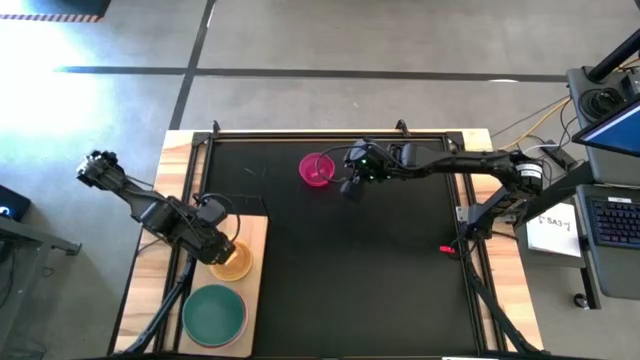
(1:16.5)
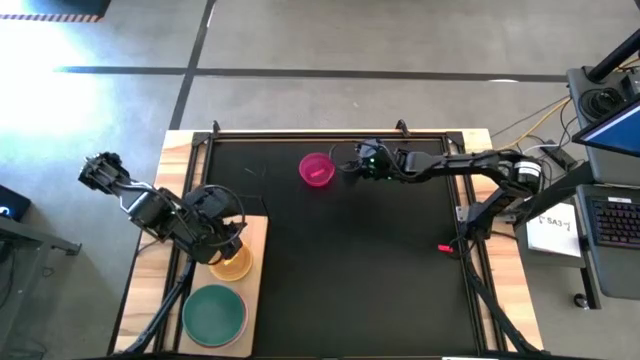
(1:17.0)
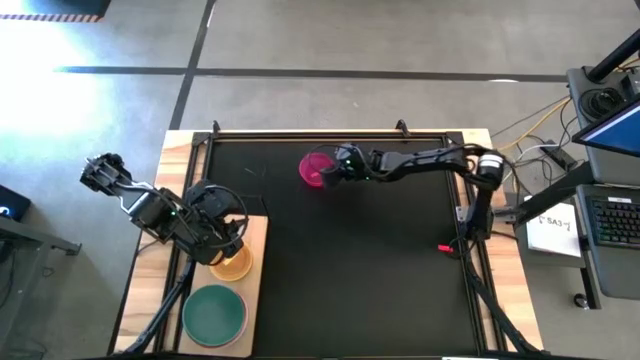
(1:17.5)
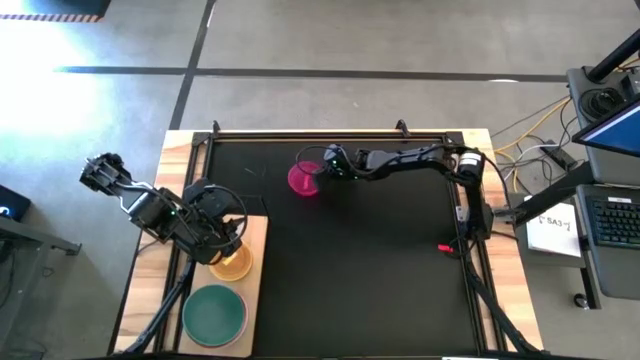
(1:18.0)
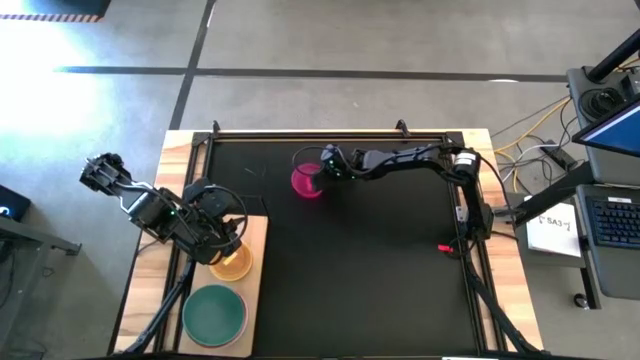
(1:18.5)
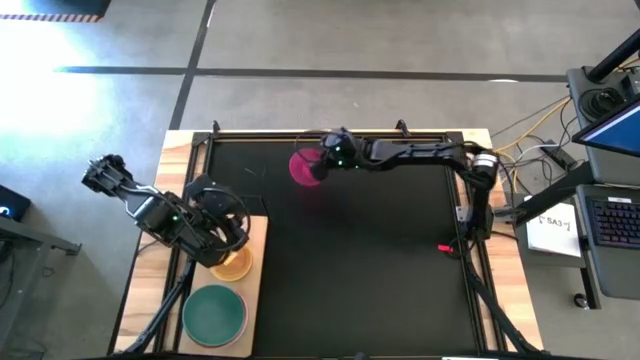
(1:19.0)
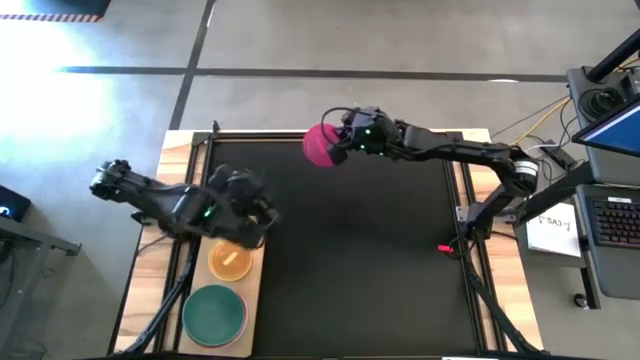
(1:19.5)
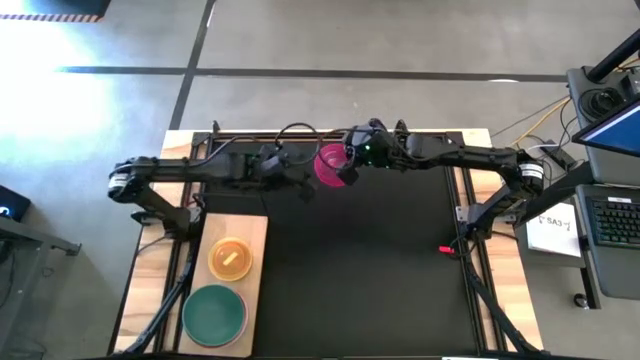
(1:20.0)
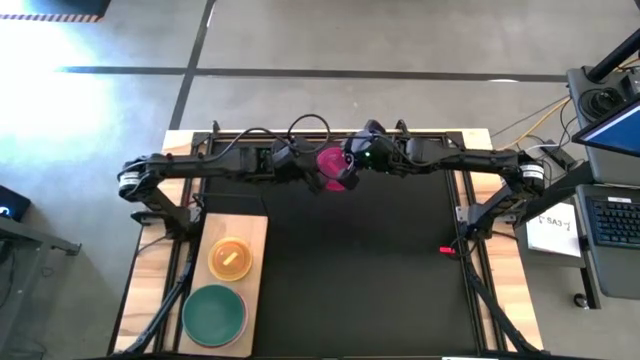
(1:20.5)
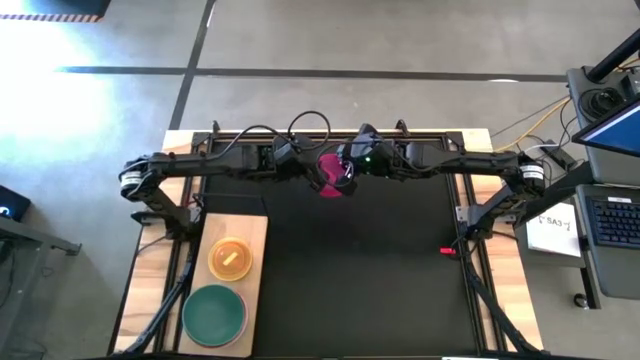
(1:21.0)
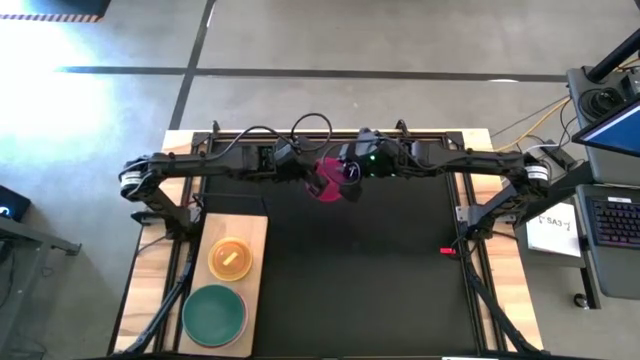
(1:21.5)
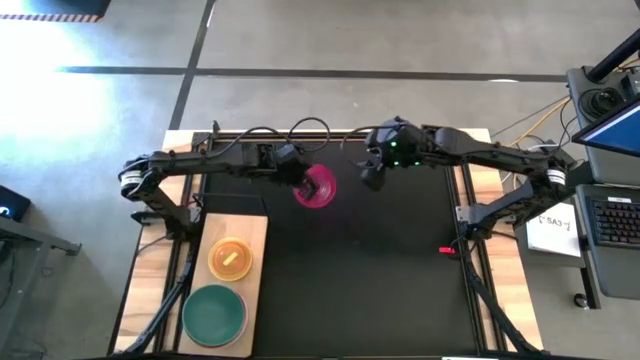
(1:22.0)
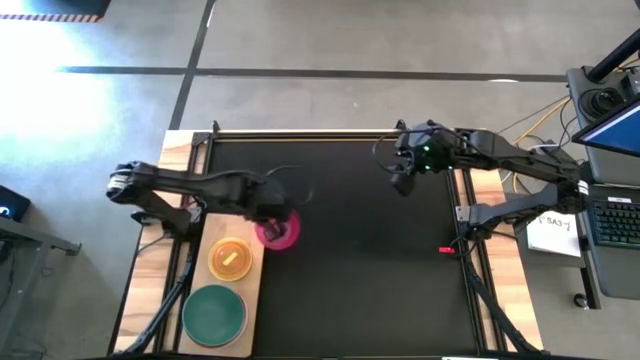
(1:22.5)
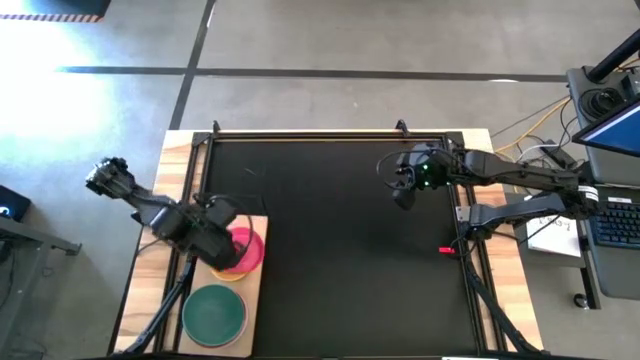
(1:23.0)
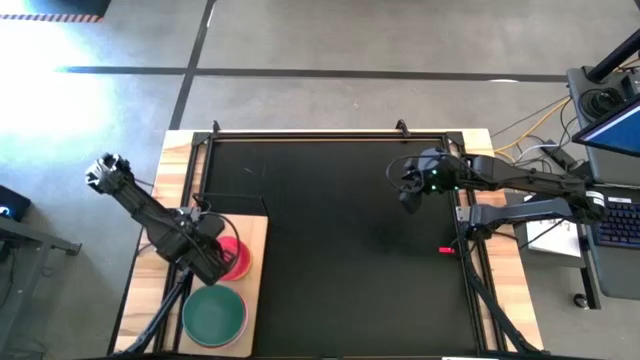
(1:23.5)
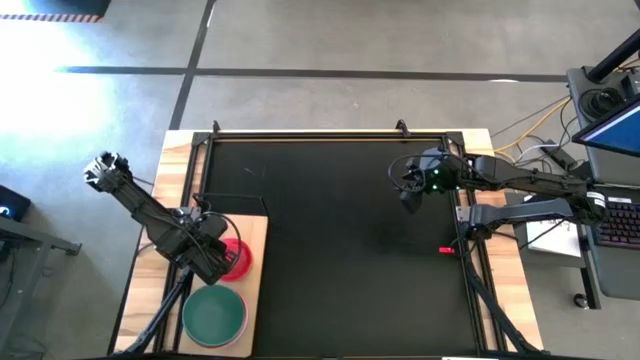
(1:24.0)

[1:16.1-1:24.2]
Task: Place and stack bowls onto a shelf
Stack the pink transparent bowl on top of the yellow transparent bowl on the shelf

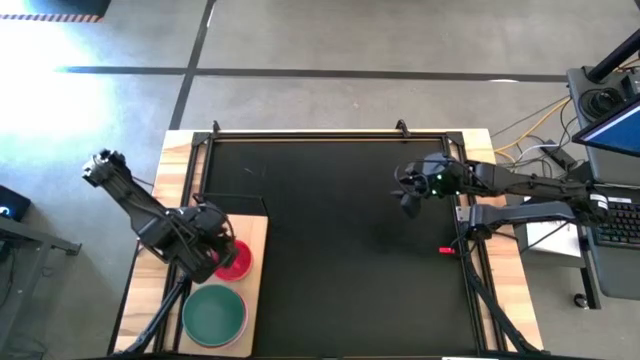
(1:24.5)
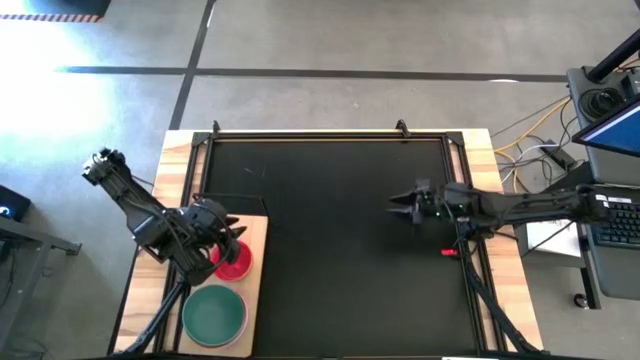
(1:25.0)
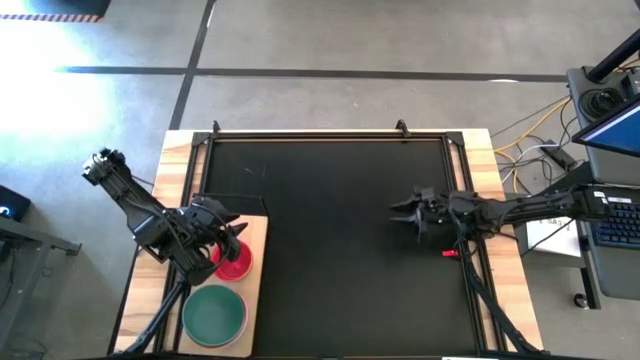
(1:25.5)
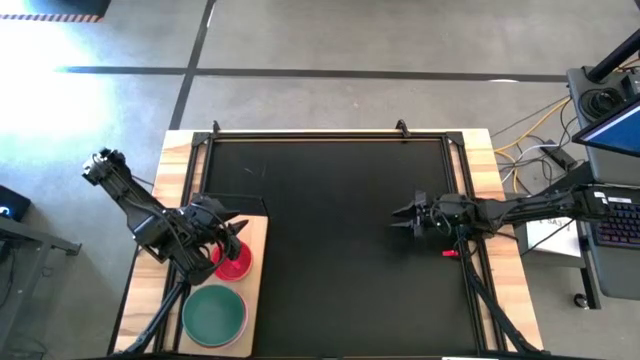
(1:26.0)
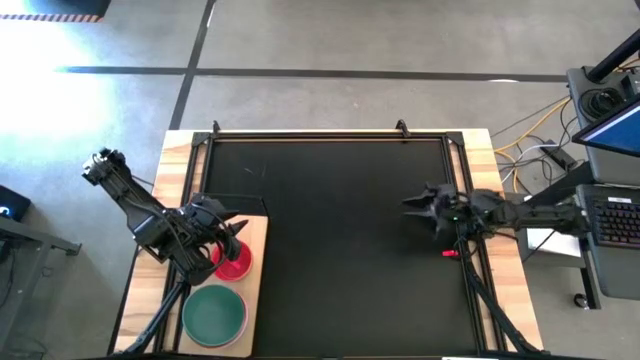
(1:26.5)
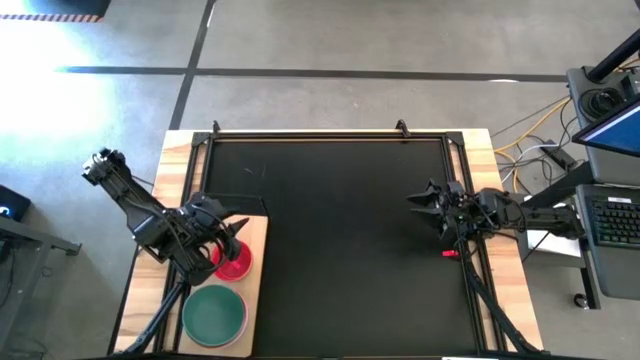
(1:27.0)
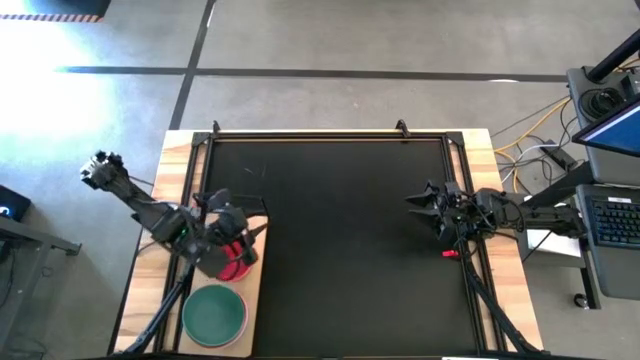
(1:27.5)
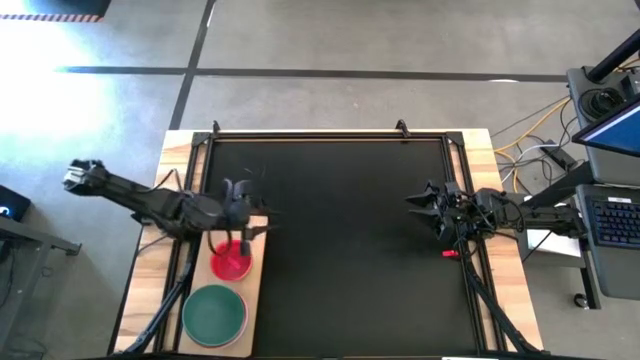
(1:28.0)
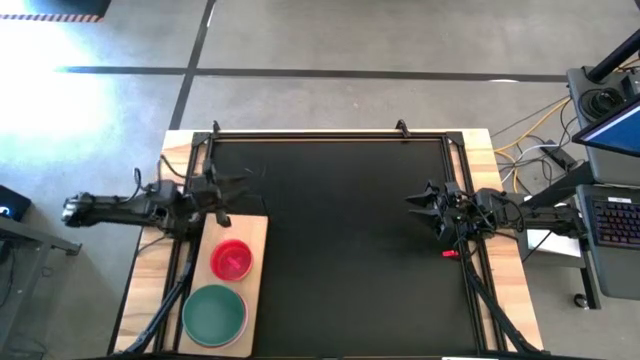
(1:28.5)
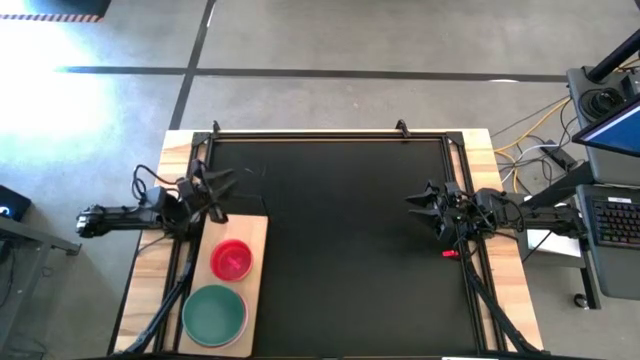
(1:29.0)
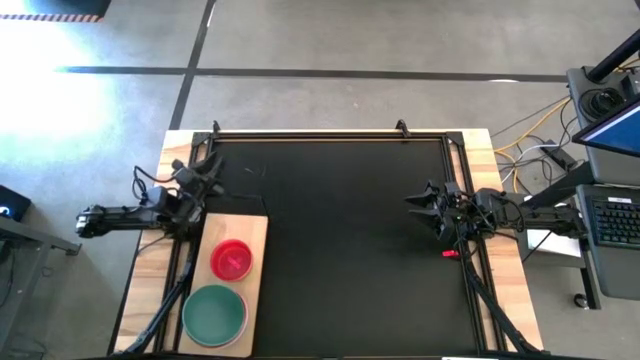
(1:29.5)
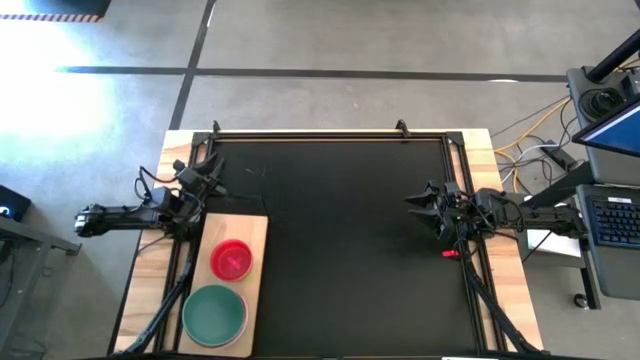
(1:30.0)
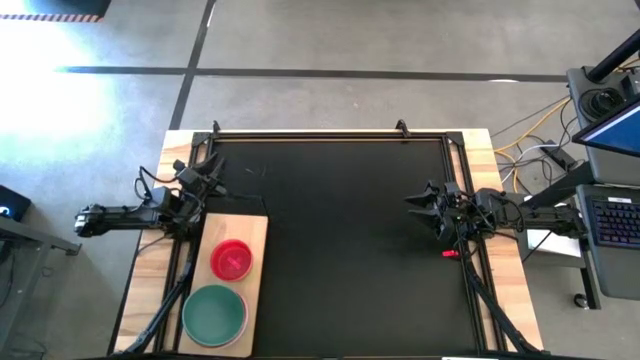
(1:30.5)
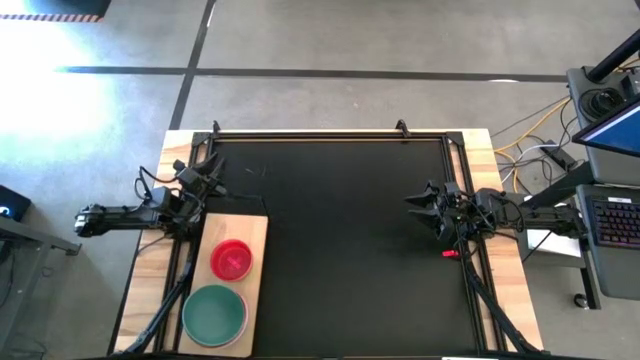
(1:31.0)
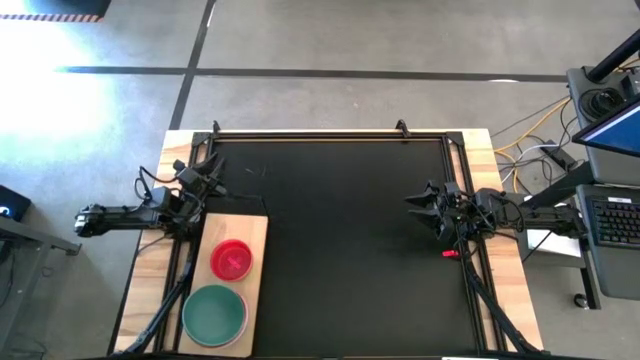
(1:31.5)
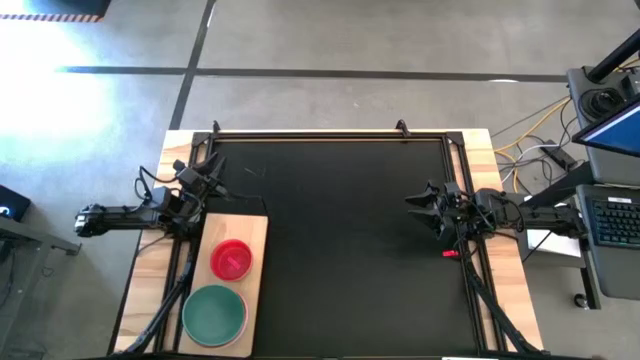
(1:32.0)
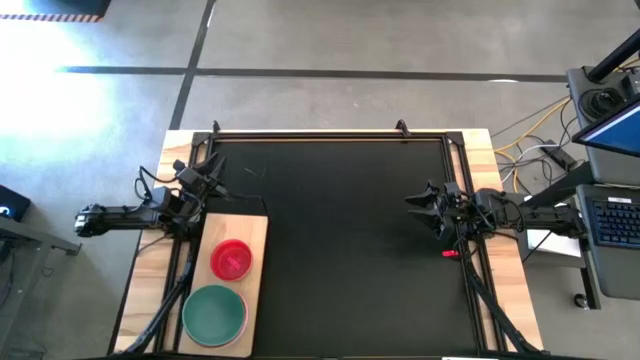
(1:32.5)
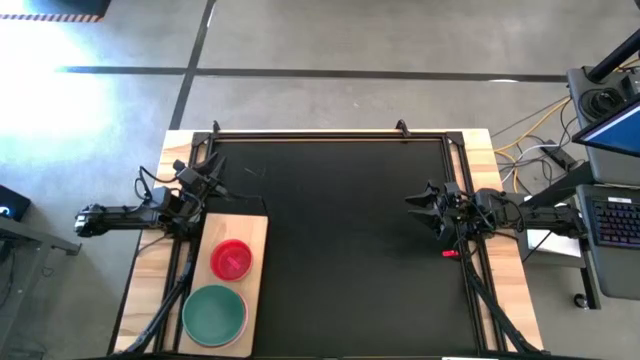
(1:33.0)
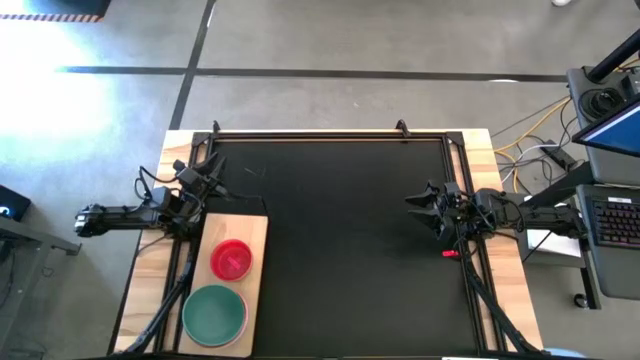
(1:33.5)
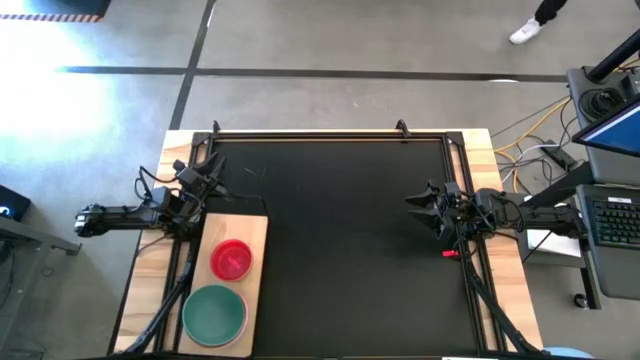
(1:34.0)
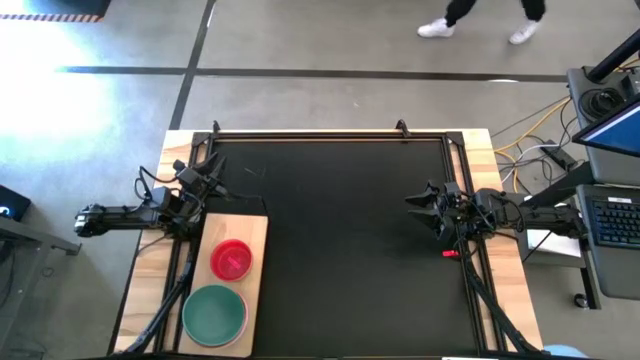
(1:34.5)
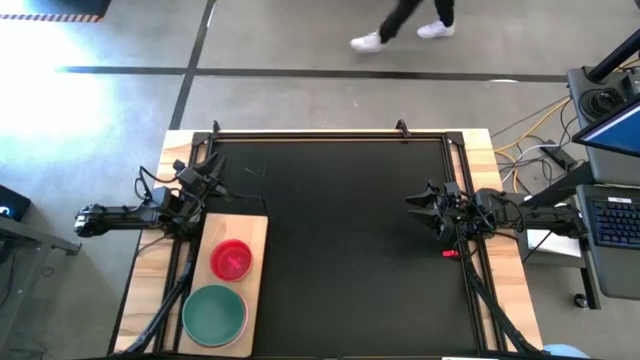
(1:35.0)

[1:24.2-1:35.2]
Return to Home Position

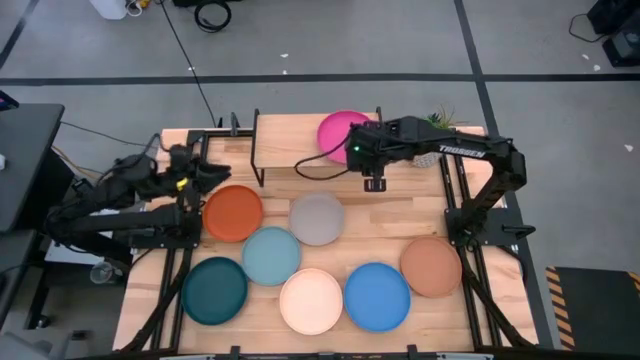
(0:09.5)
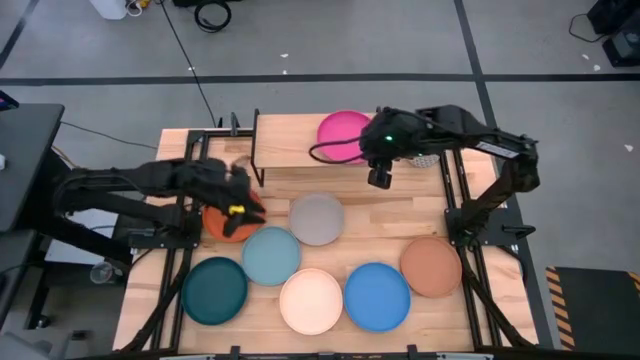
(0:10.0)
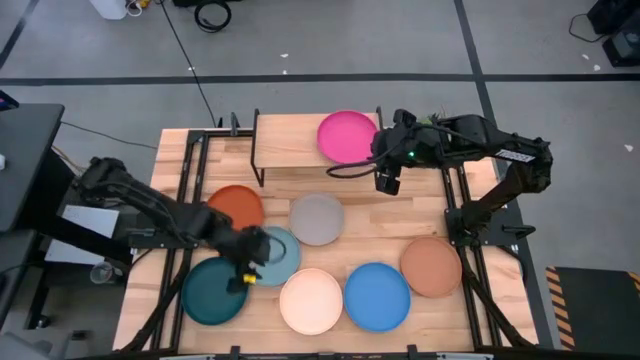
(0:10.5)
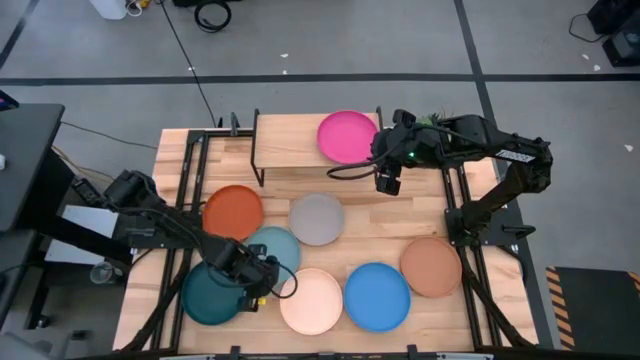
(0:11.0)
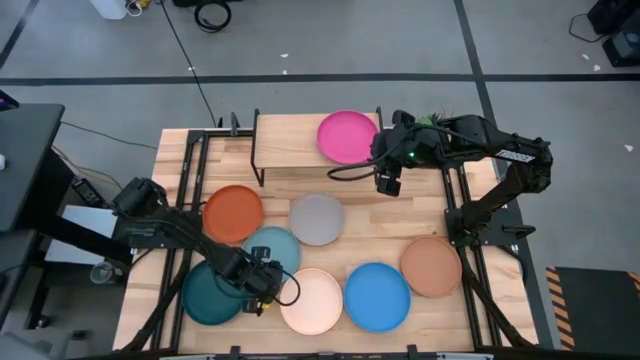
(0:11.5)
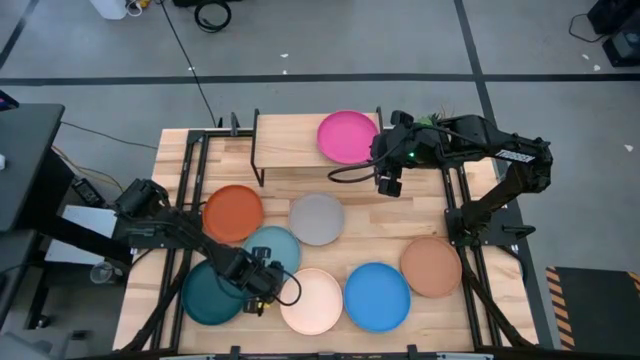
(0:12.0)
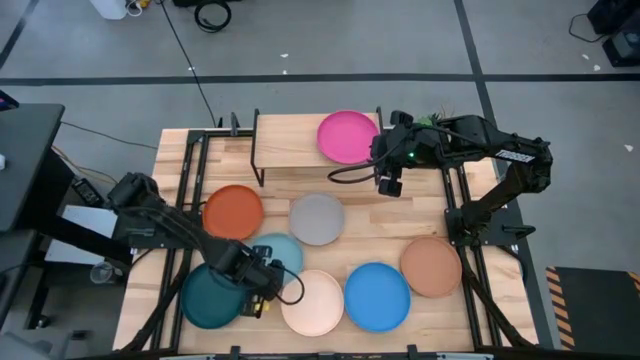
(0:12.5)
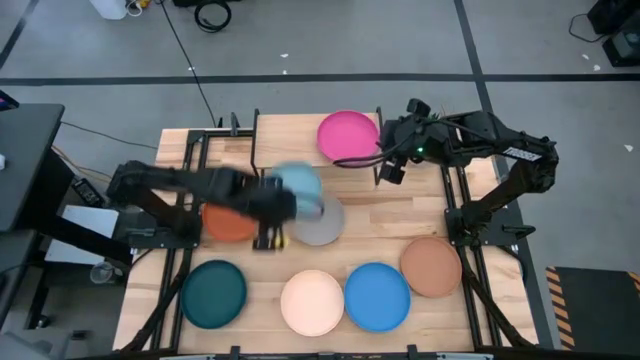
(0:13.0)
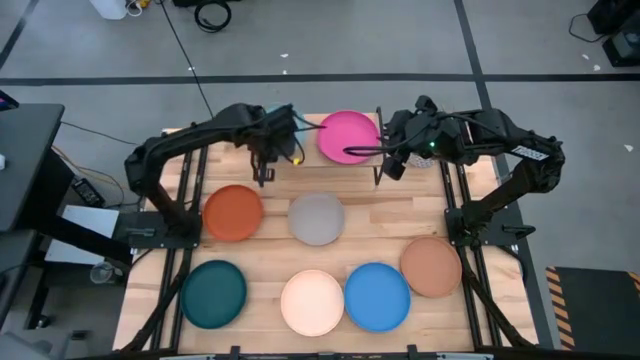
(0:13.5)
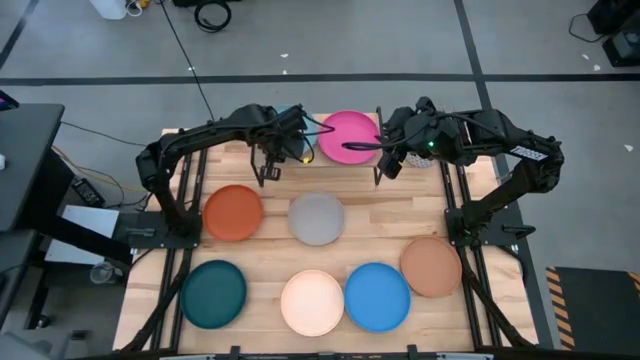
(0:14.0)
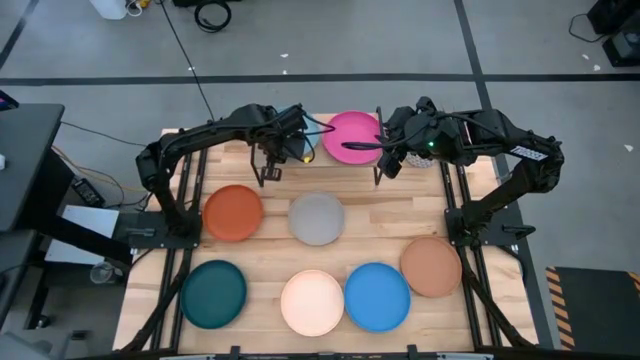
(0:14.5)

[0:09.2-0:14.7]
Task: Place and stack plates onto a shelf
Put the light blue plate on the shelf
